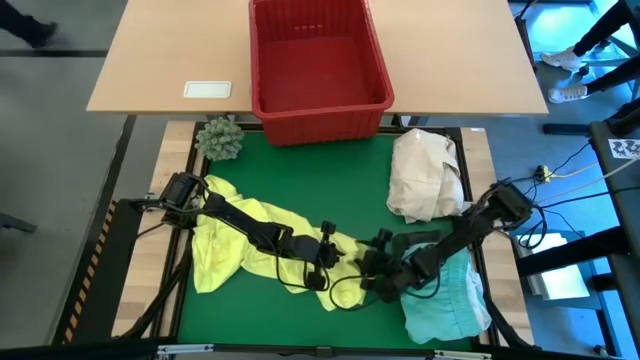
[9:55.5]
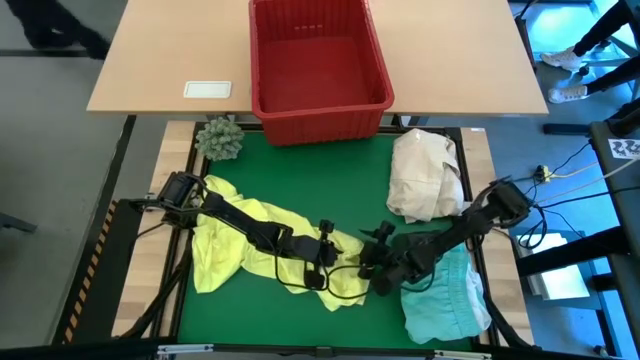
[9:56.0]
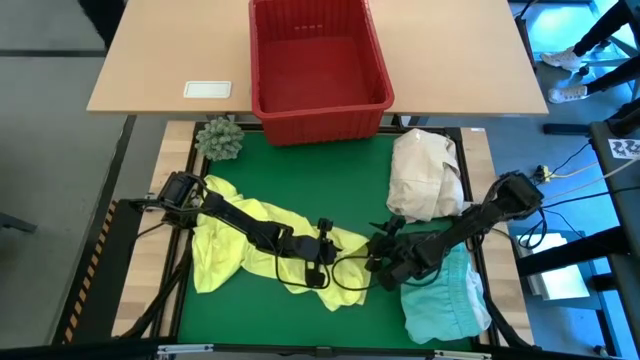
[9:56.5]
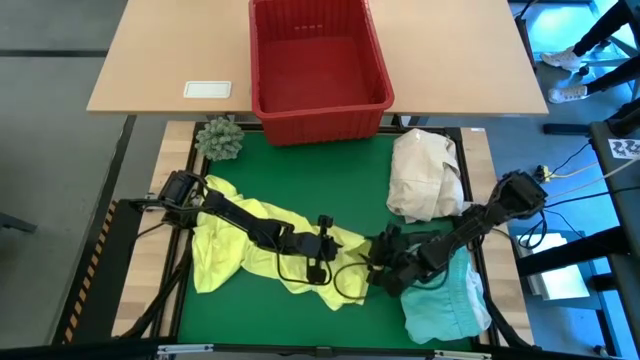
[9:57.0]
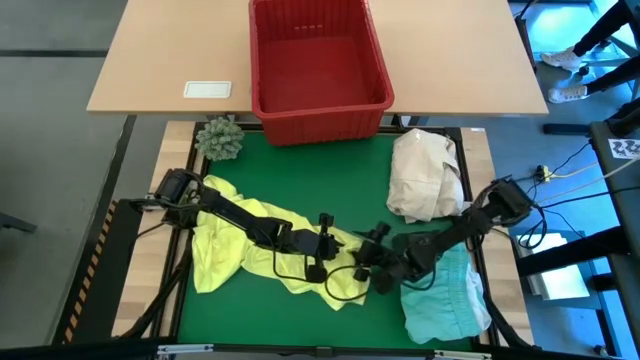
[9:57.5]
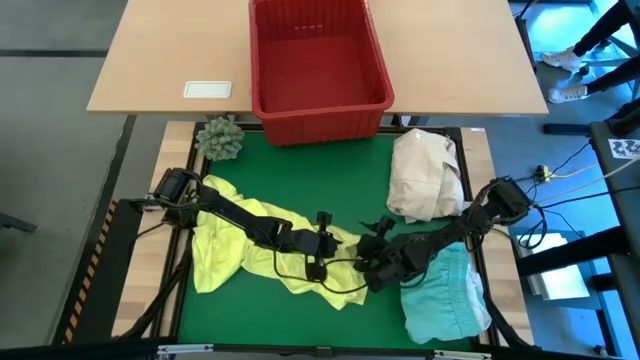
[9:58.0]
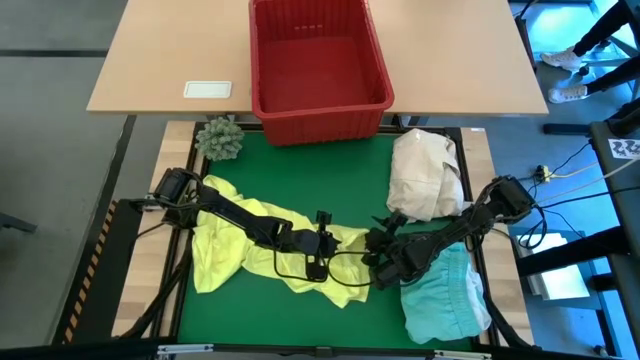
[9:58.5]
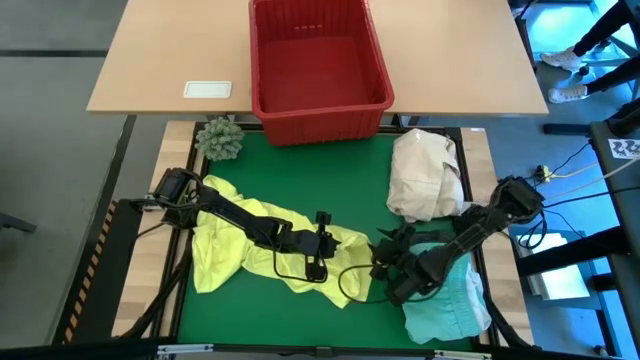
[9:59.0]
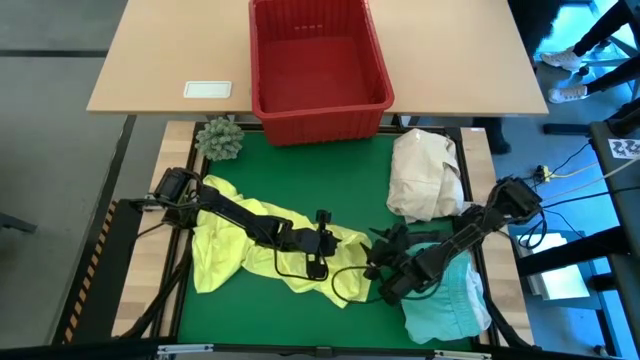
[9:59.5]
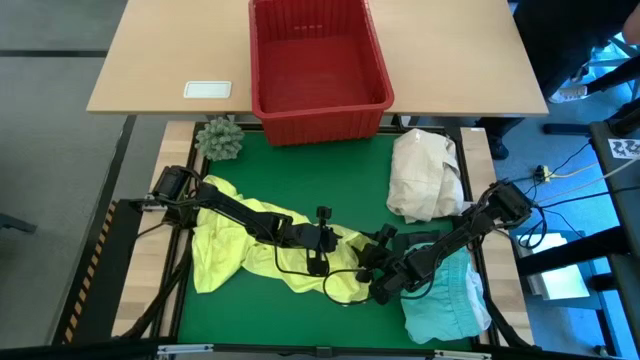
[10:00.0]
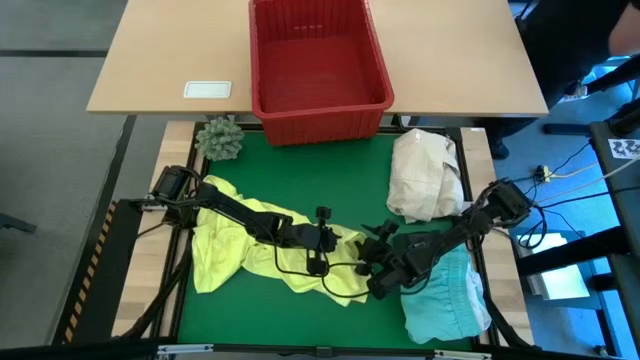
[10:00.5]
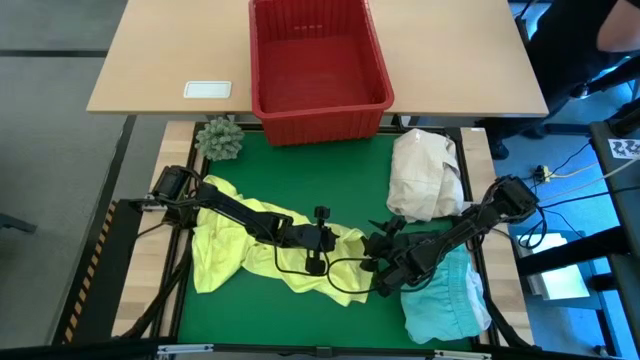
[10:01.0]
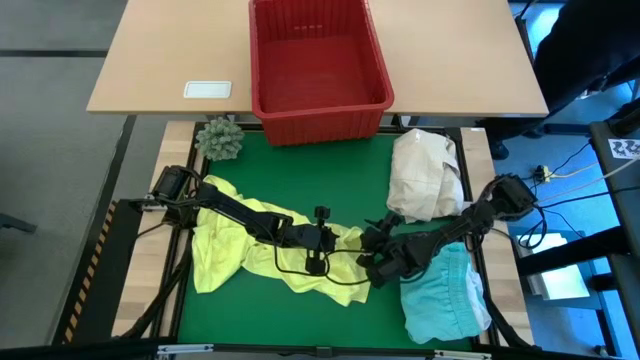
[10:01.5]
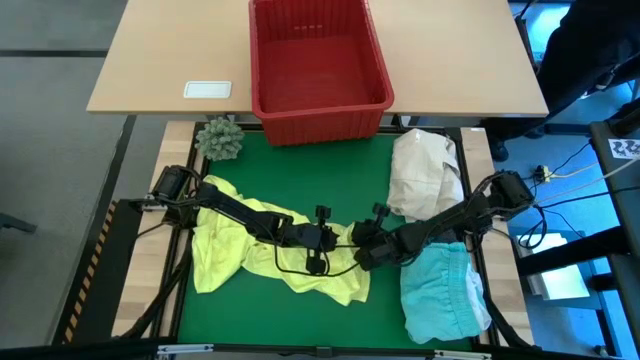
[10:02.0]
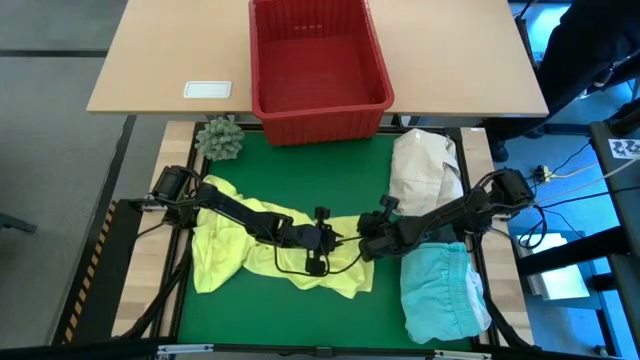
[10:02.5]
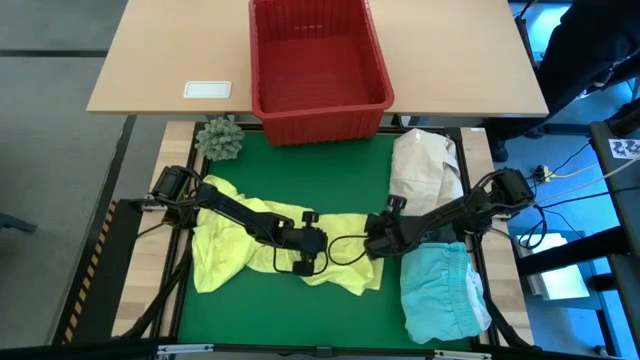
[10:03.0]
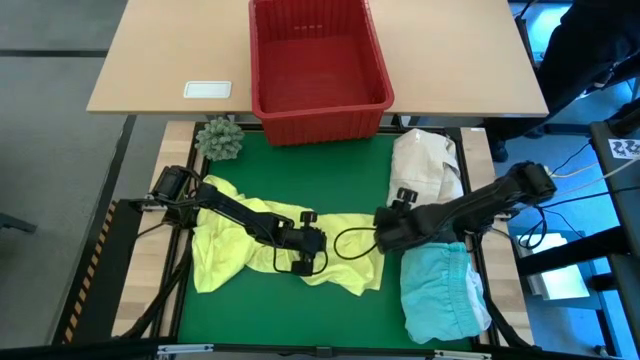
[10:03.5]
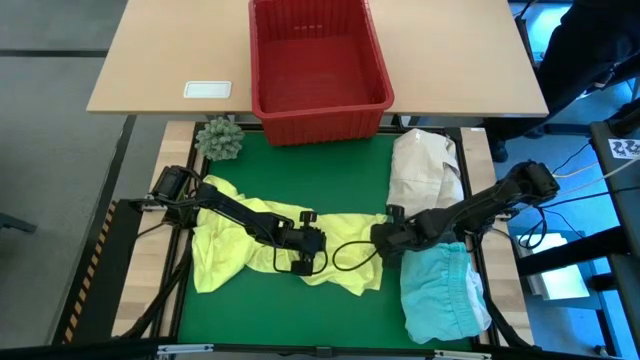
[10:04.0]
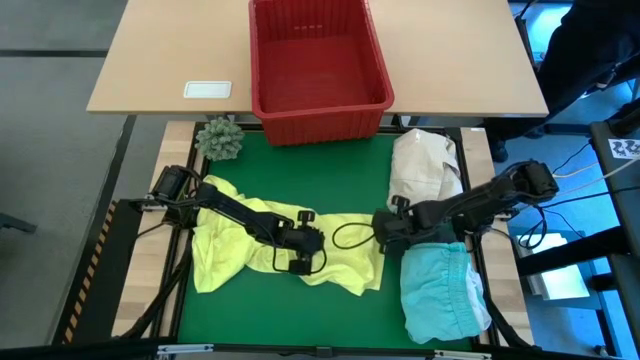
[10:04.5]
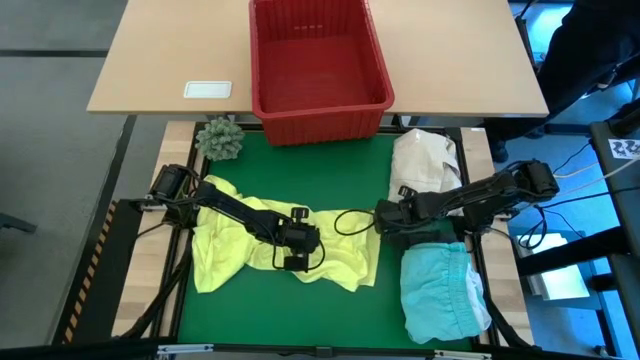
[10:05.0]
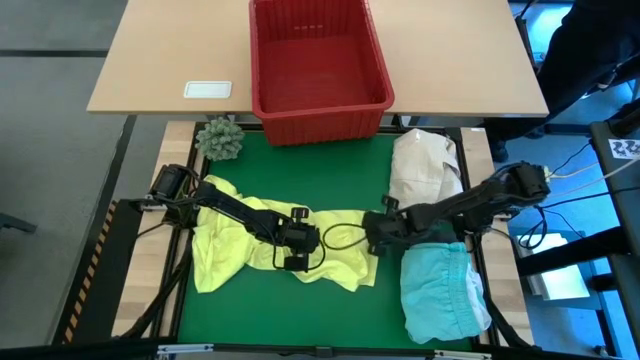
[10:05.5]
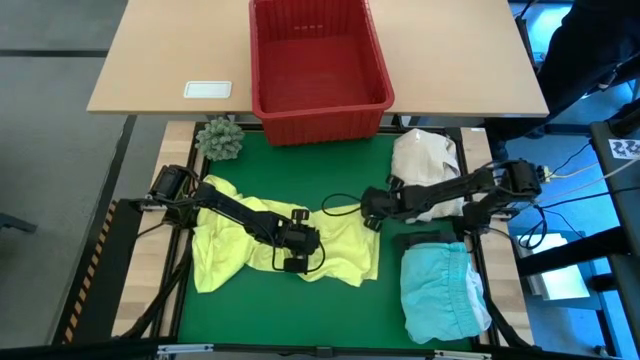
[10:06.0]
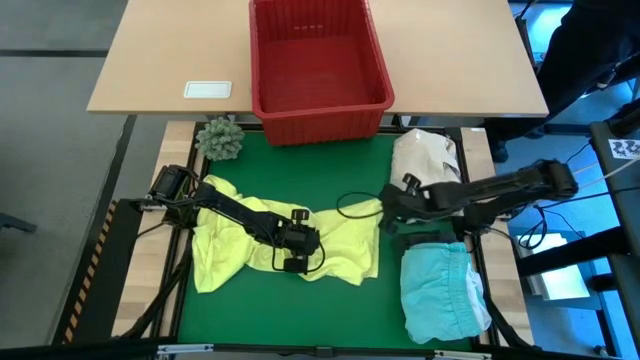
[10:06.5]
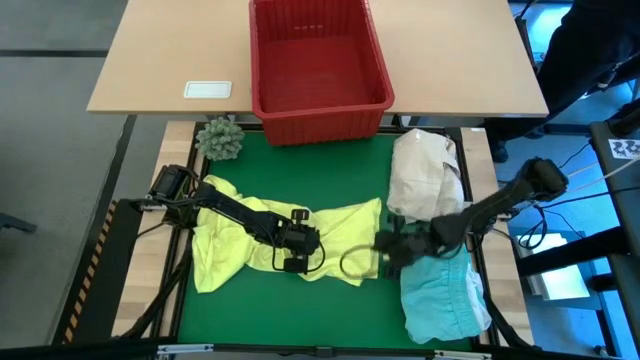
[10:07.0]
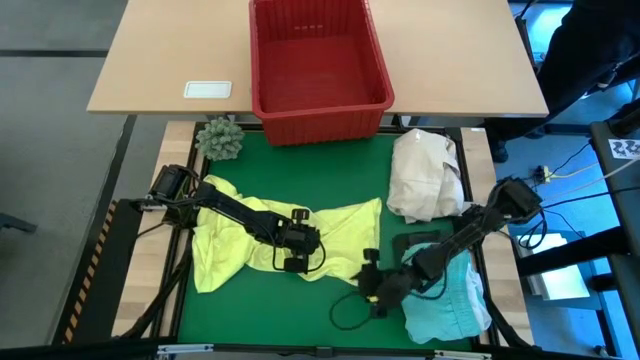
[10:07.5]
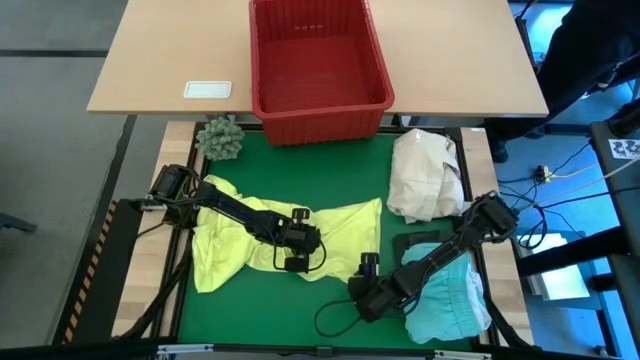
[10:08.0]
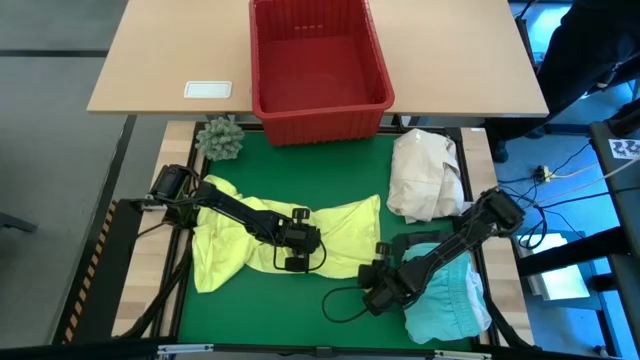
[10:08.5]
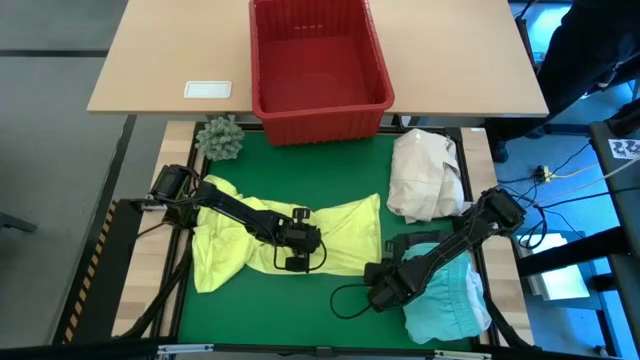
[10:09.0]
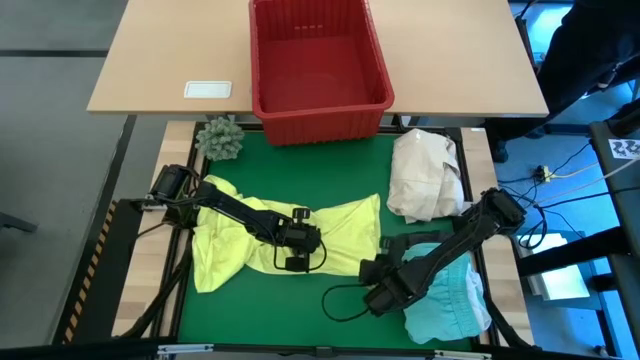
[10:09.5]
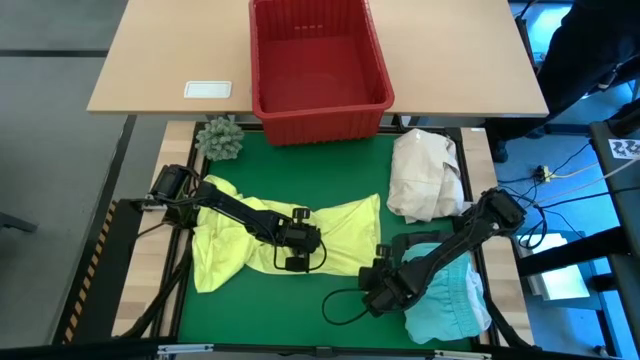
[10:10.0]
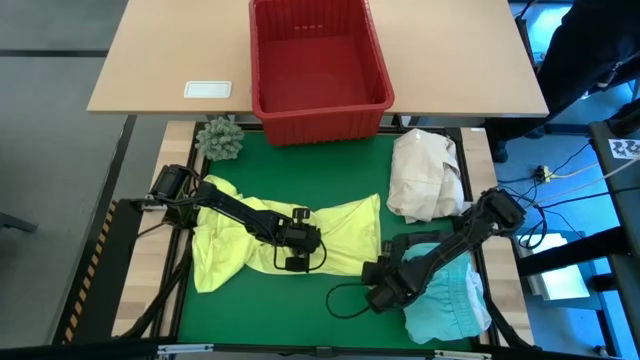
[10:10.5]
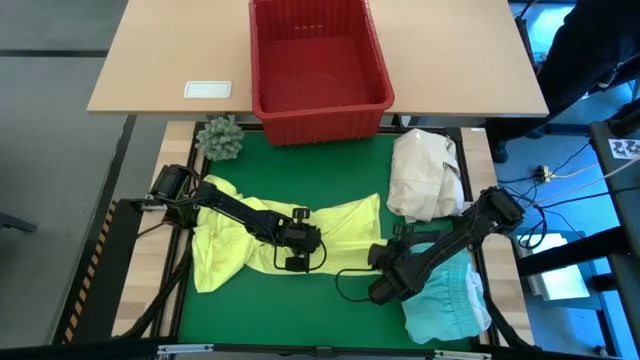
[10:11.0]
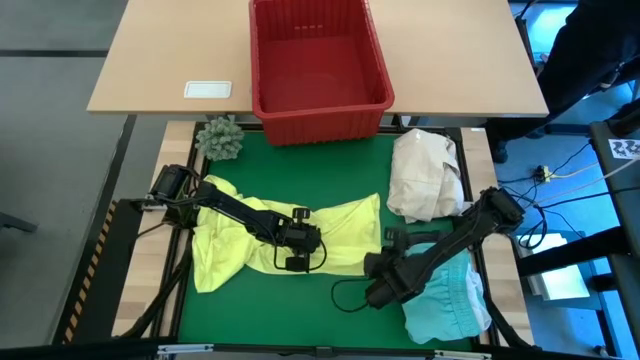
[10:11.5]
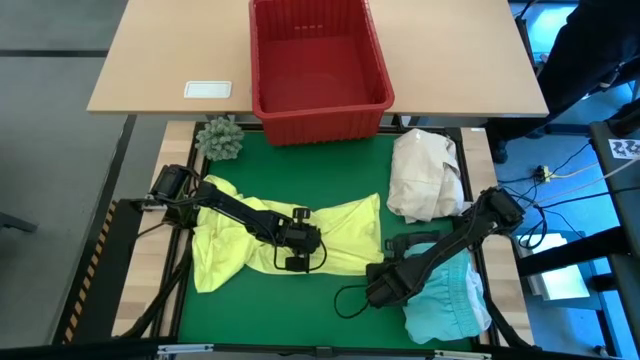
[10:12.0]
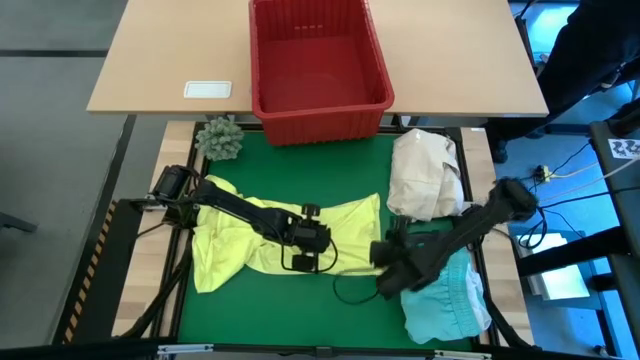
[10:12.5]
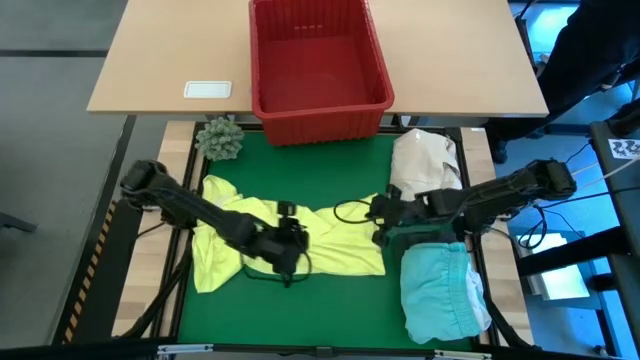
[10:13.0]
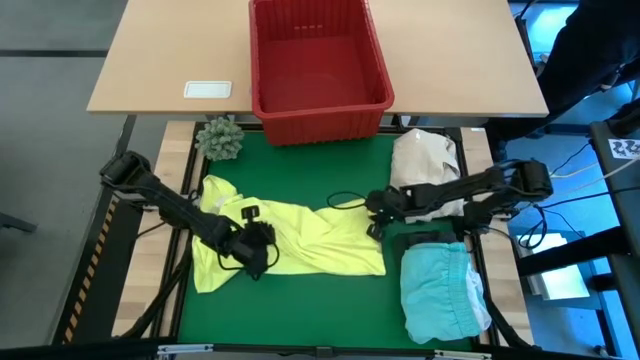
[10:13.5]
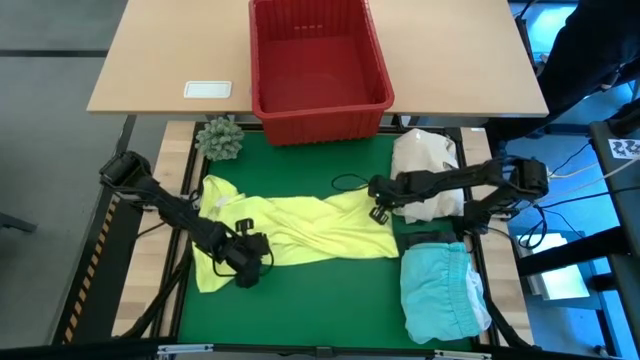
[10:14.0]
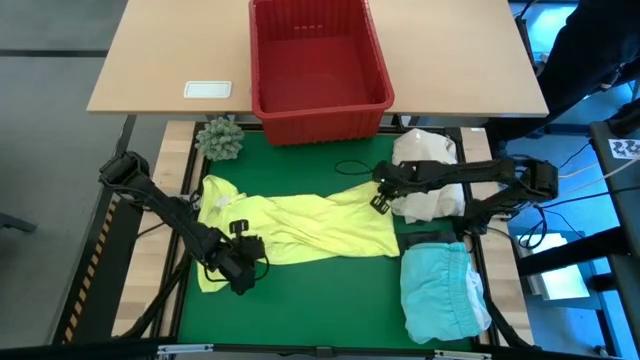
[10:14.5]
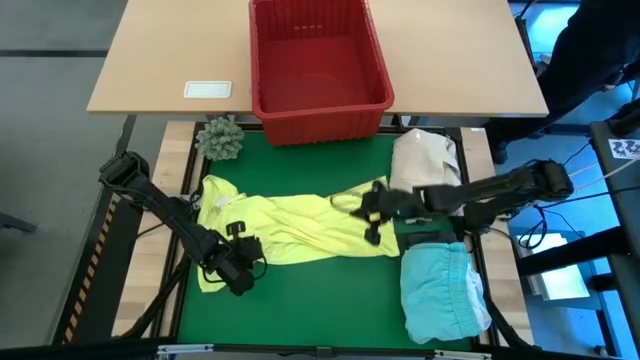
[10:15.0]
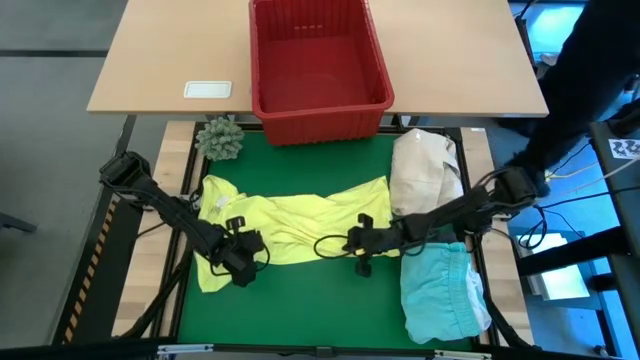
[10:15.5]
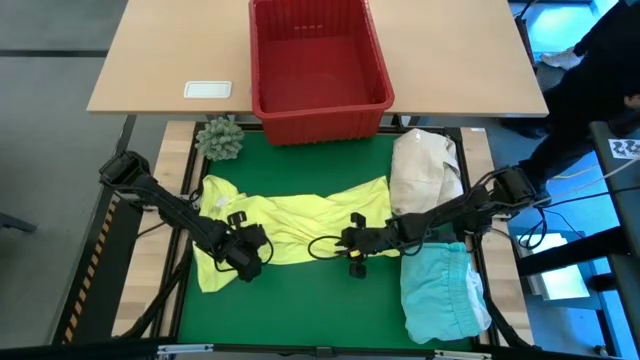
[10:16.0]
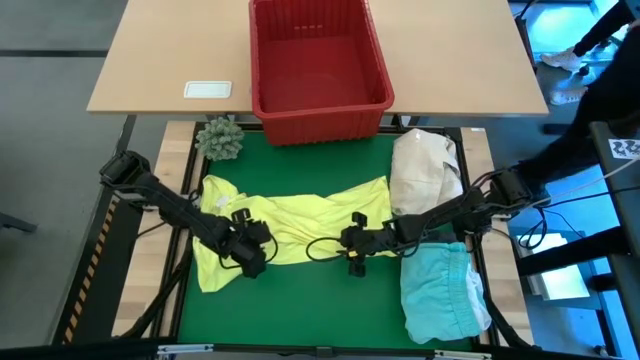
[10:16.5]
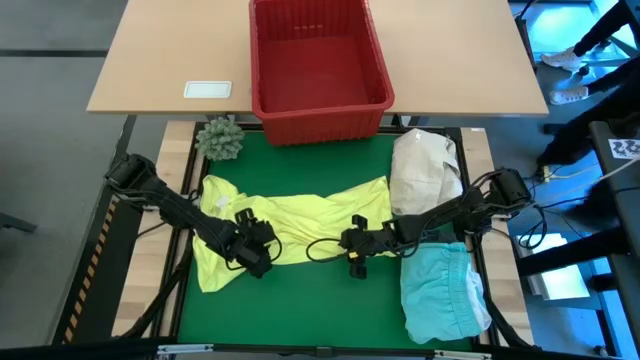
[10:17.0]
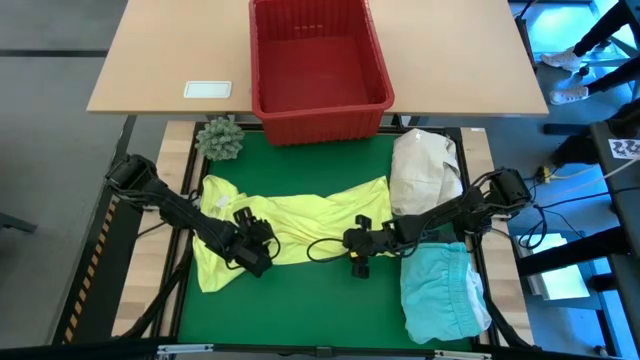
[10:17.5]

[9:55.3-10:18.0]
Task: Fold Laundry from Bin
Fold the yellow shirt
